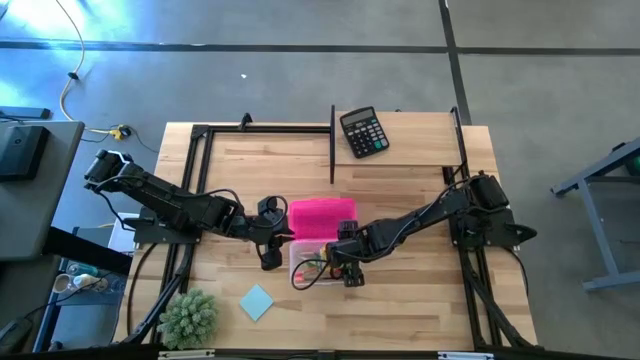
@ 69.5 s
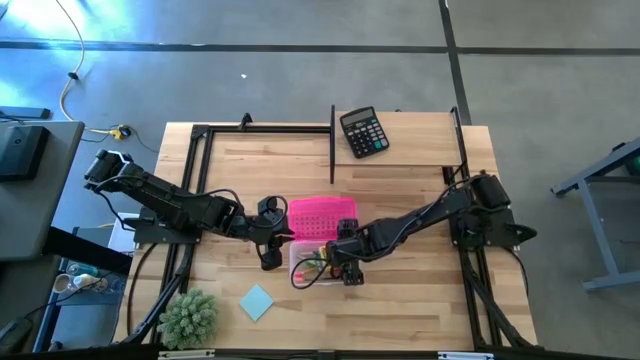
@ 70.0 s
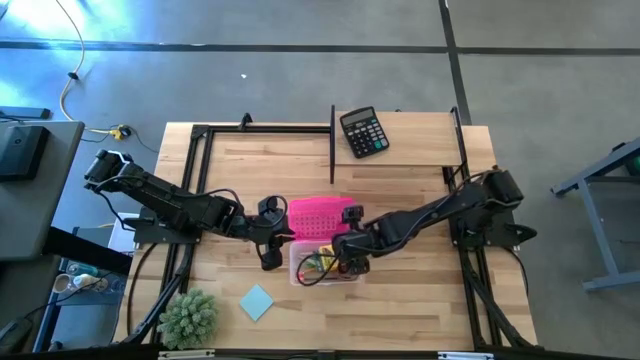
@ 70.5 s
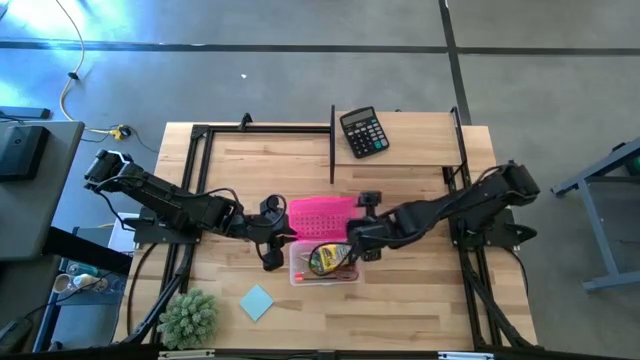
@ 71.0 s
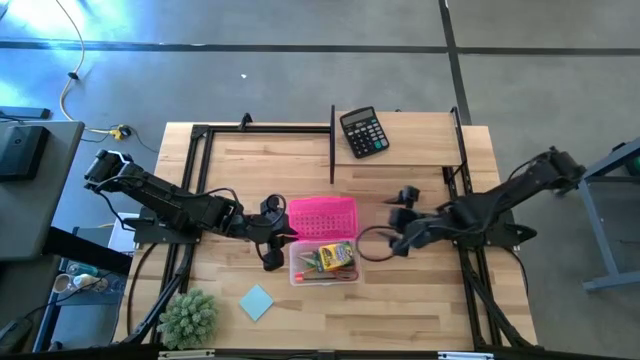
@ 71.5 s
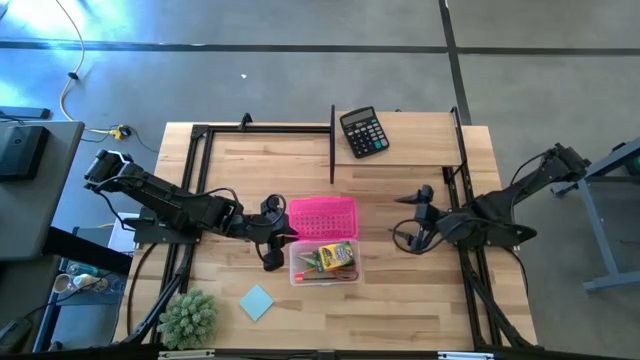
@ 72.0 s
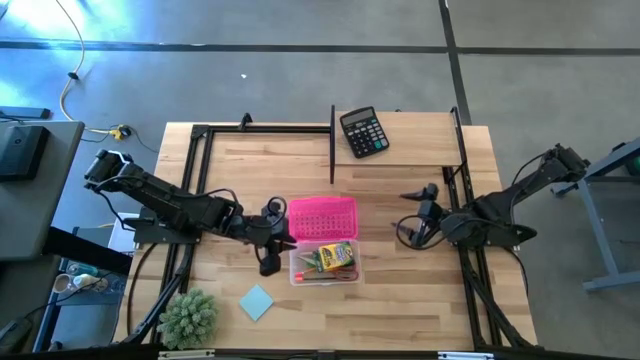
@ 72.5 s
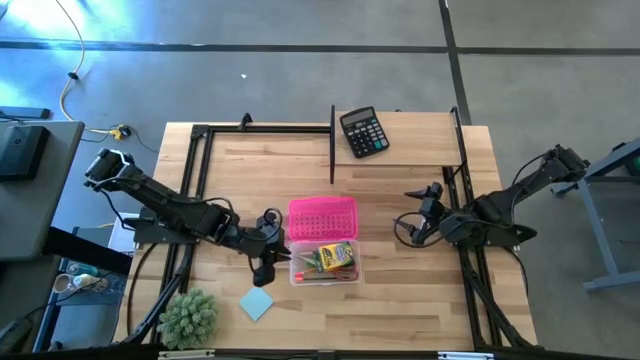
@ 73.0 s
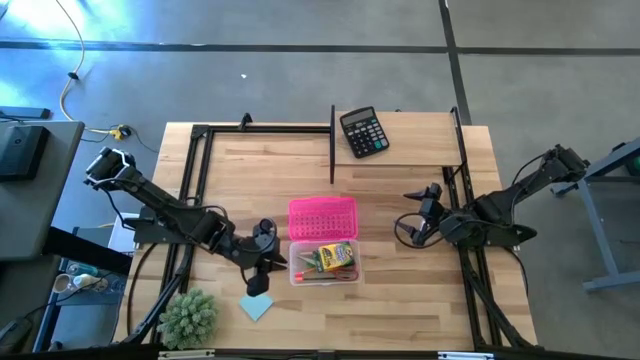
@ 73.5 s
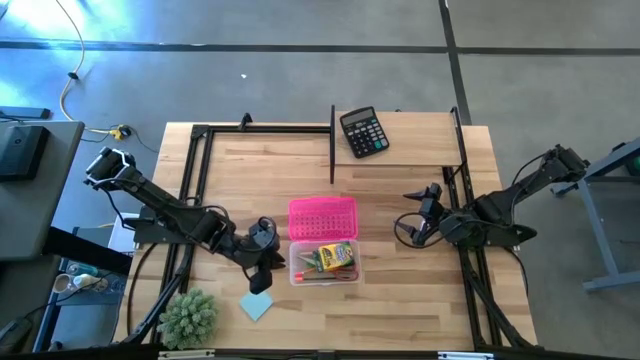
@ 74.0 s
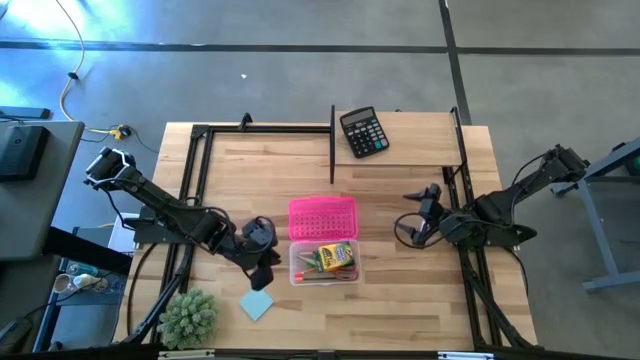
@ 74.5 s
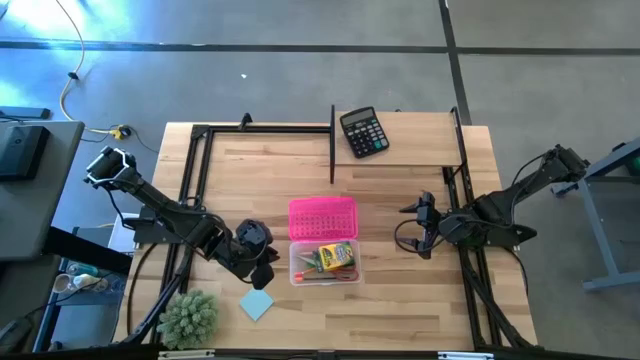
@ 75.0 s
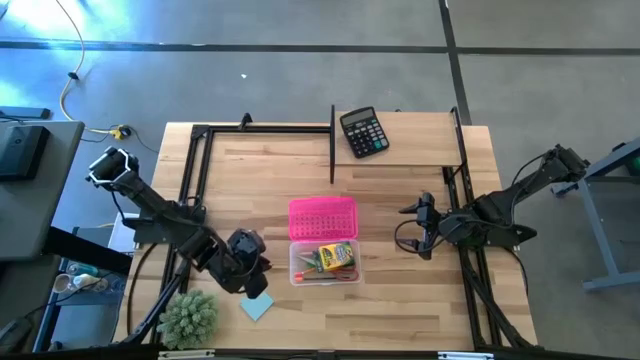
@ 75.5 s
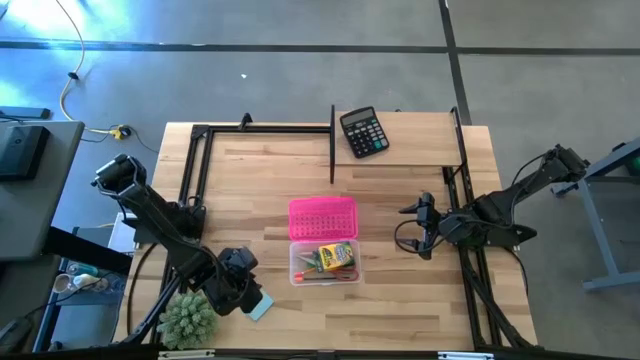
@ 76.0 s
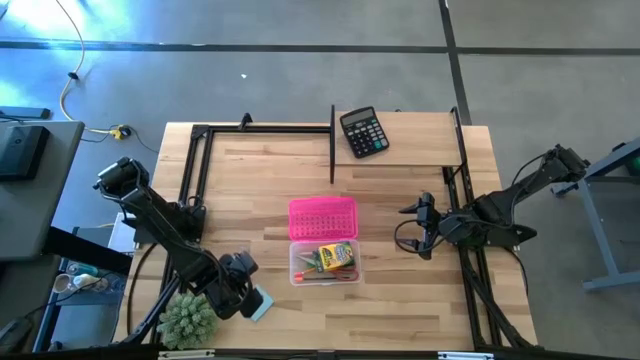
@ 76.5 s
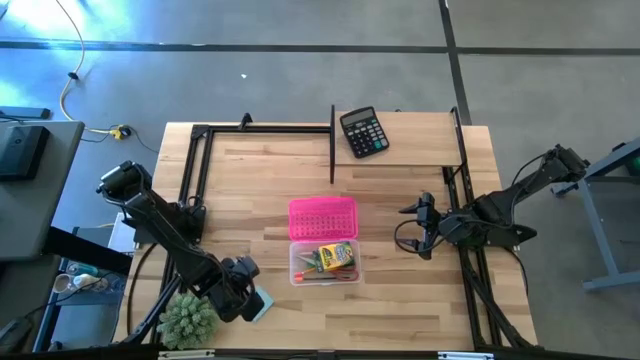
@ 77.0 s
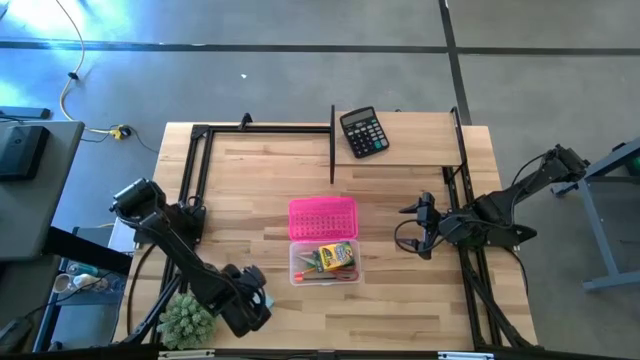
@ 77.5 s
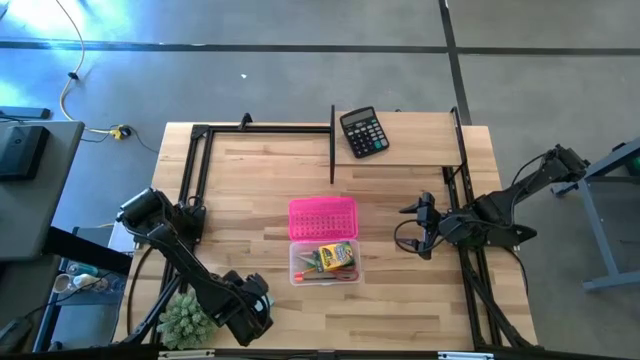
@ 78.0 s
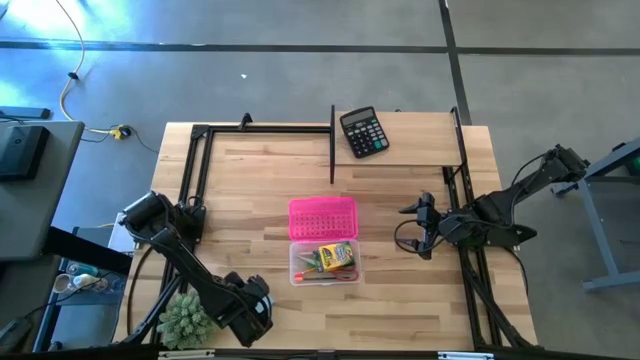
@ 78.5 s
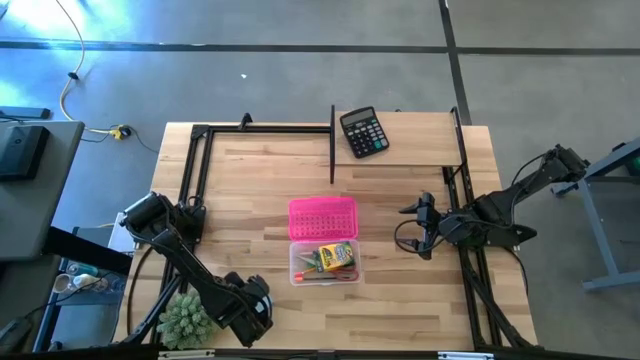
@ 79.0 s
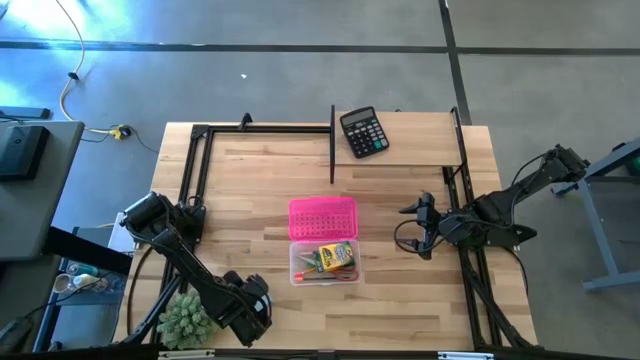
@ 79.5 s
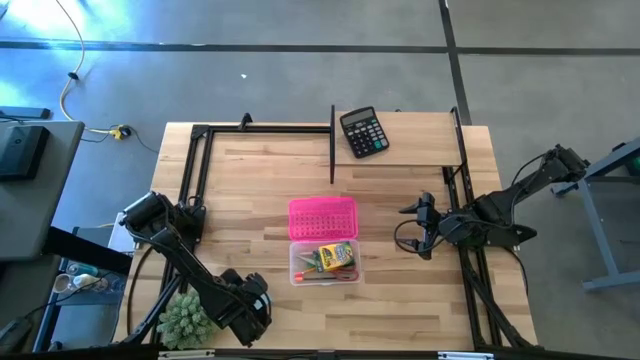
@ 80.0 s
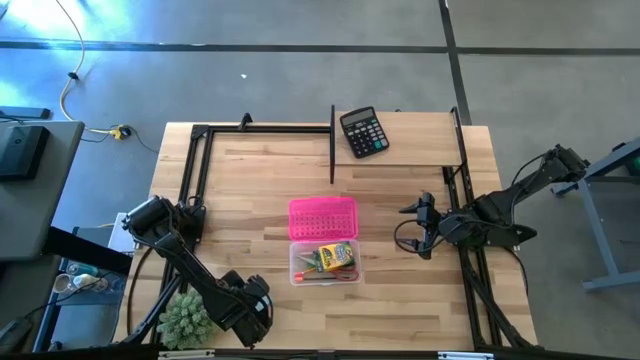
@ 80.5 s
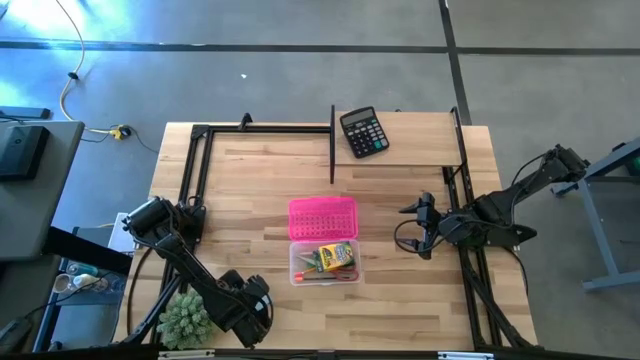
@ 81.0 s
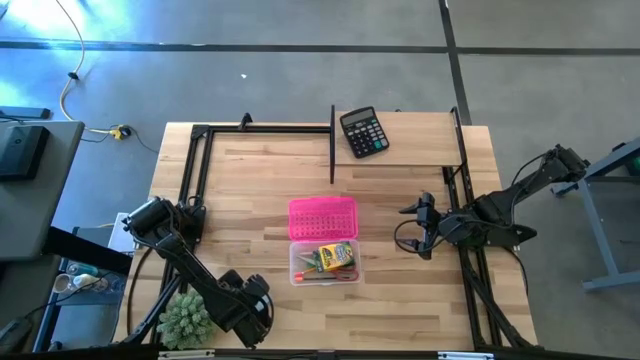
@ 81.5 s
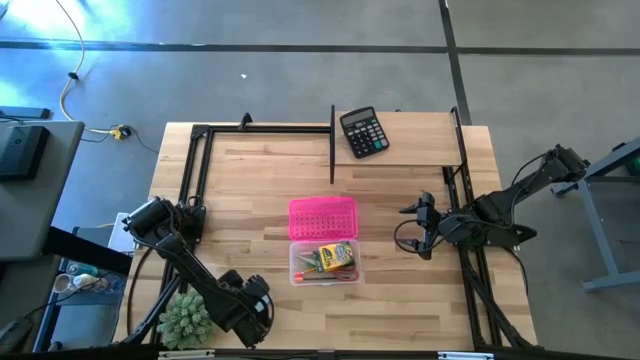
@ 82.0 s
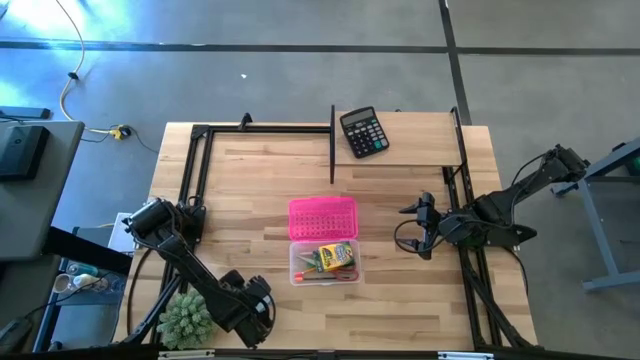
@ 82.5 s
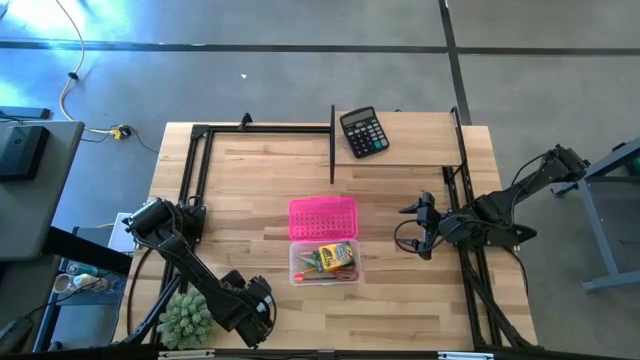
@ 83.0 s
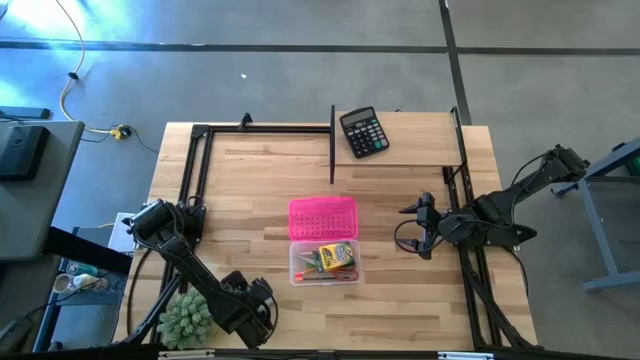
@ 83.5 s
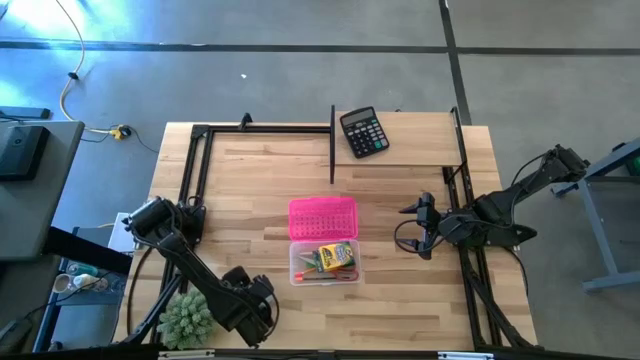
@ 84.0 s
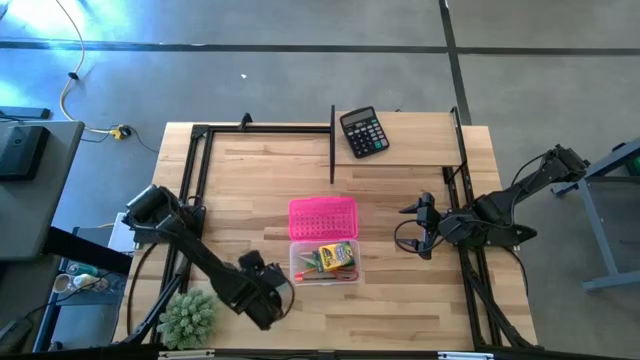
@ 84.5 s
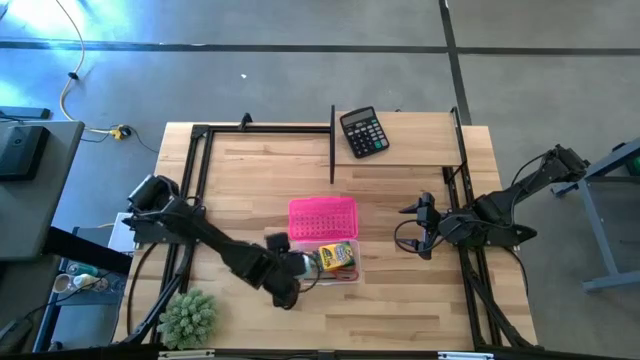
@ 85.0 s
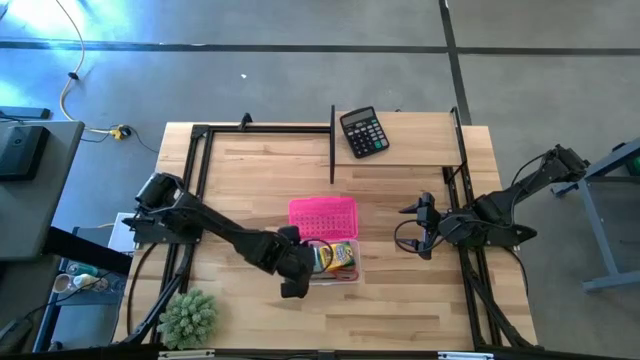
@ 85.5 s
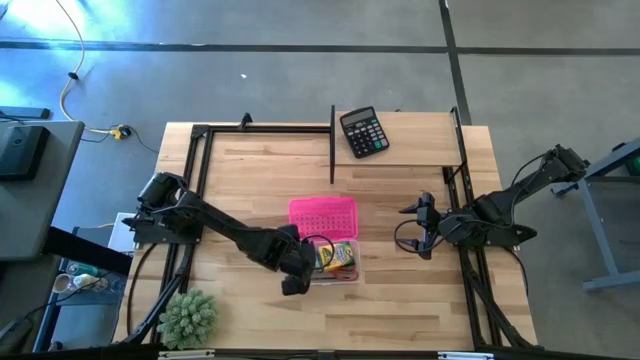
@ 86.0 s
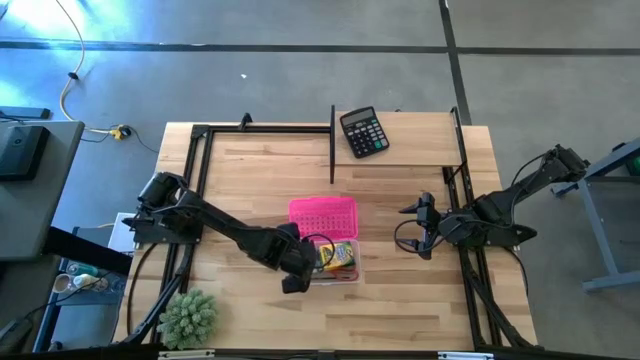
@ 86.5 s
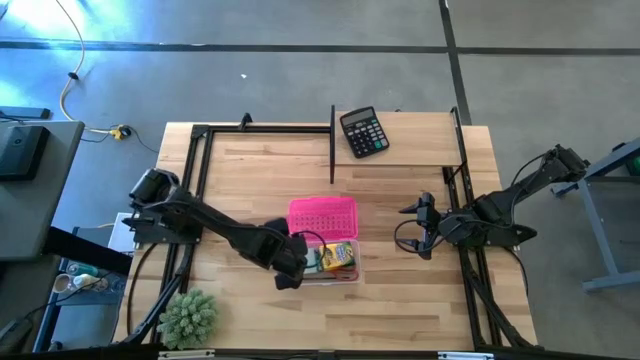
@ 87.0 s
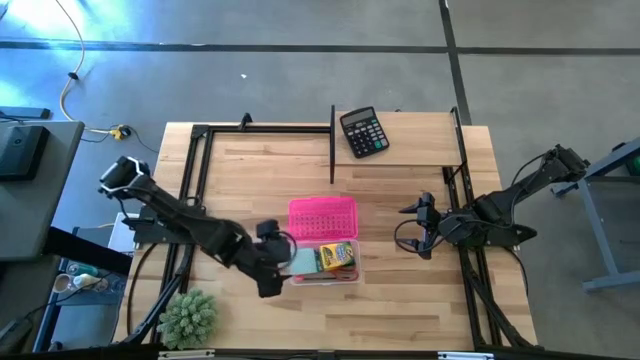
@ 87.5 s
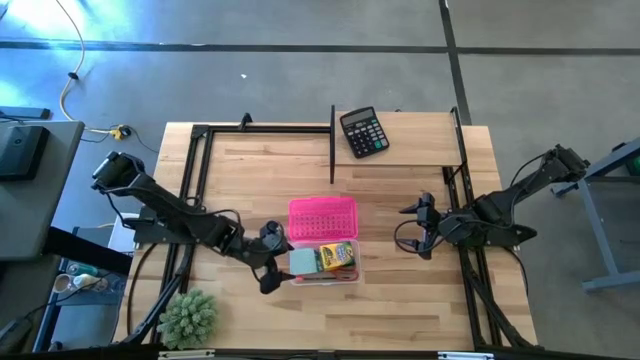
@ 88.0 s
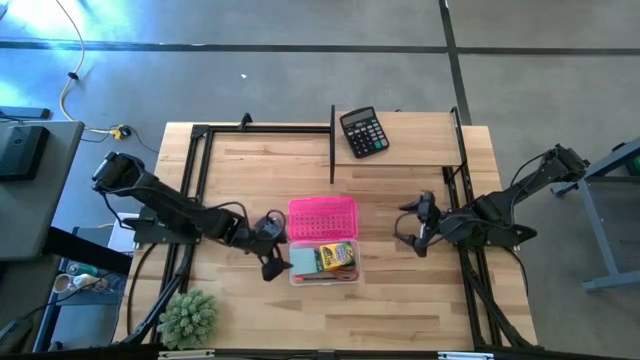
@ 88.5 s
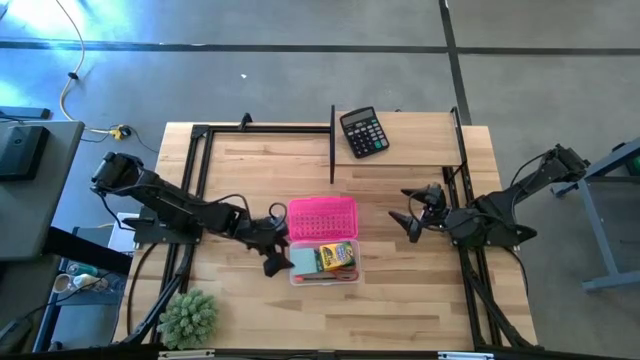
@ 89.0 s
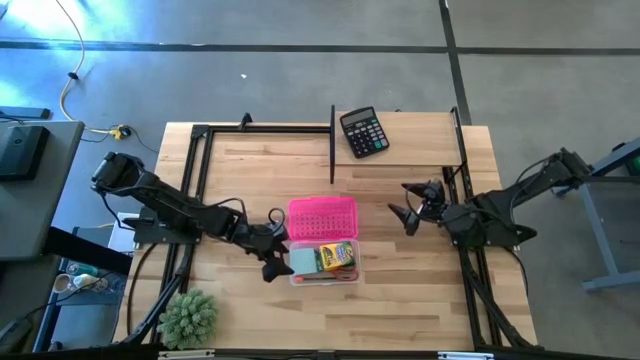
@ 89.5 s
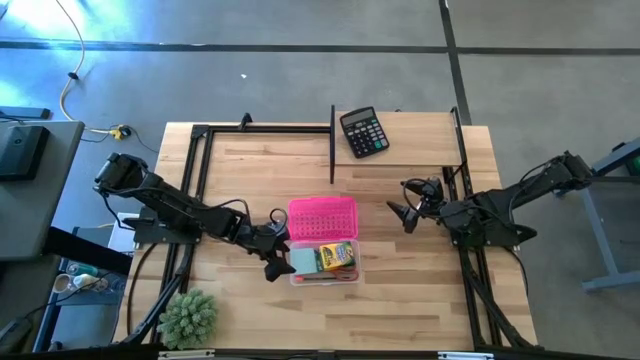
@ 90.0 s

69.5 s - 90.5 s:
Task: Pack school essentials
Put the blue sticky notes into the supply box
